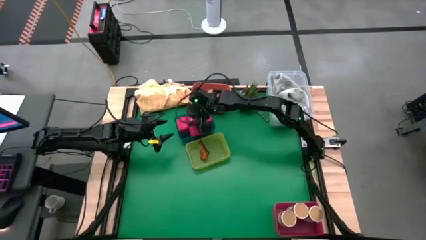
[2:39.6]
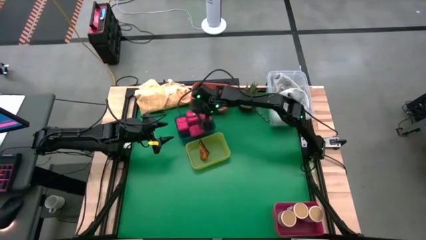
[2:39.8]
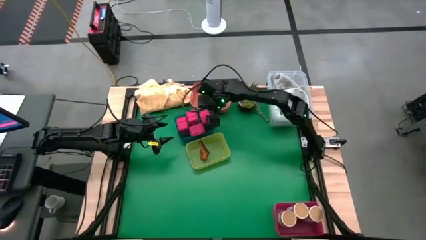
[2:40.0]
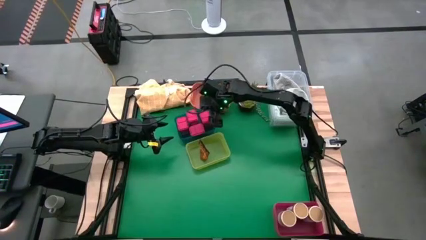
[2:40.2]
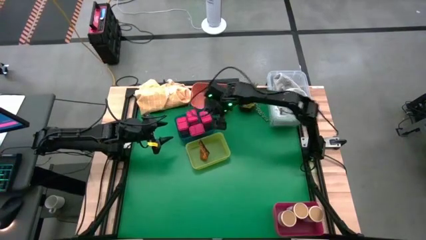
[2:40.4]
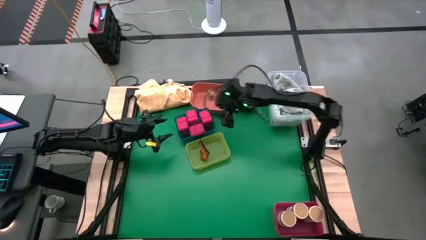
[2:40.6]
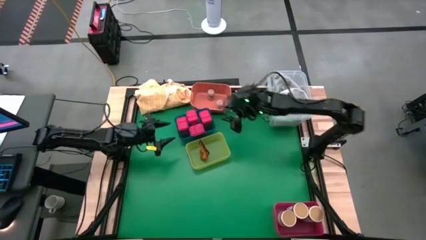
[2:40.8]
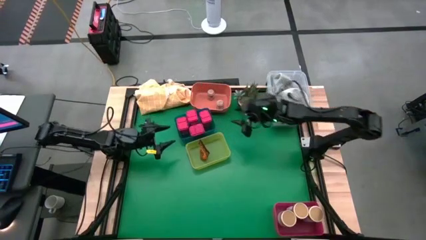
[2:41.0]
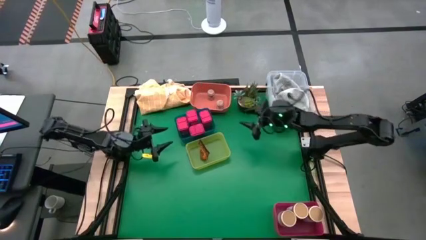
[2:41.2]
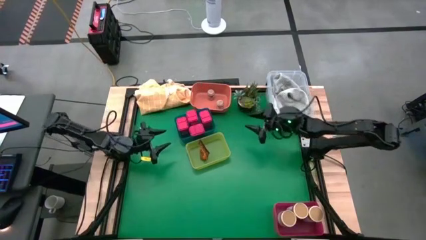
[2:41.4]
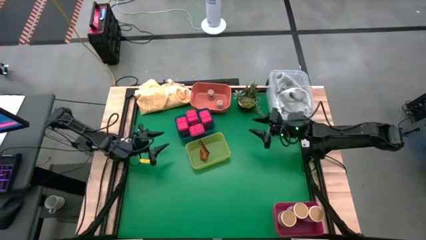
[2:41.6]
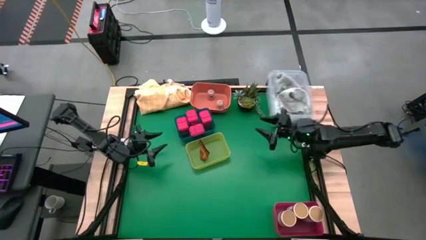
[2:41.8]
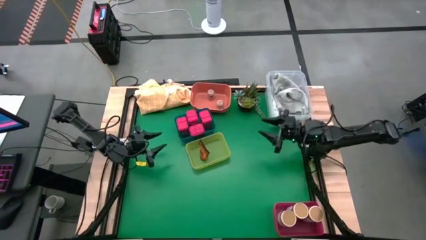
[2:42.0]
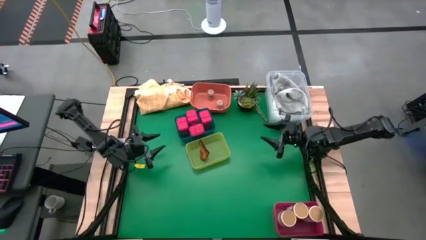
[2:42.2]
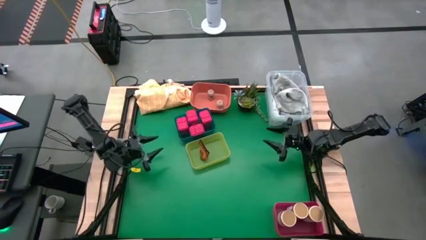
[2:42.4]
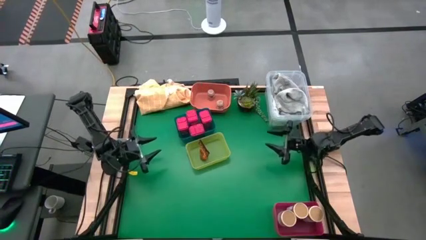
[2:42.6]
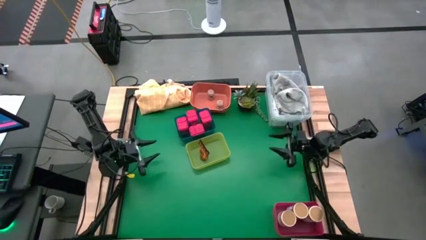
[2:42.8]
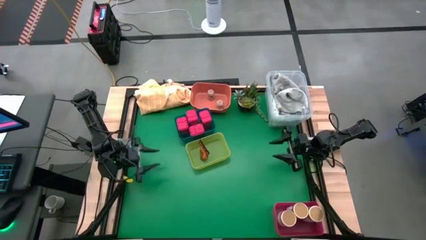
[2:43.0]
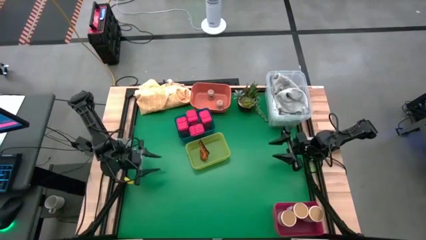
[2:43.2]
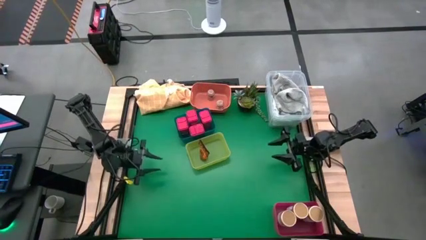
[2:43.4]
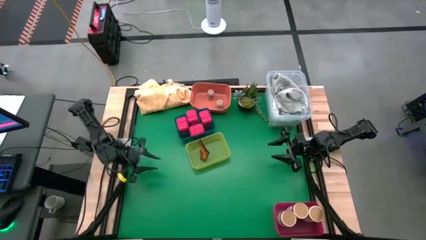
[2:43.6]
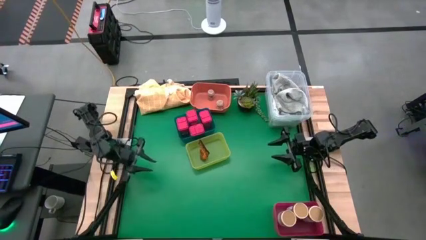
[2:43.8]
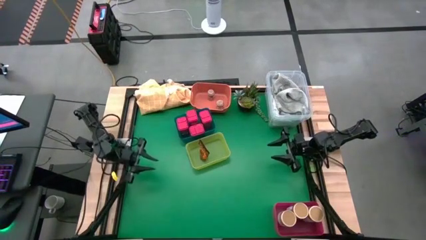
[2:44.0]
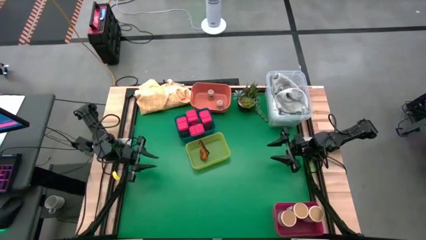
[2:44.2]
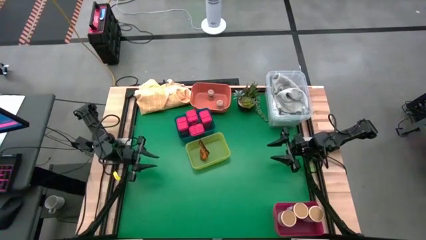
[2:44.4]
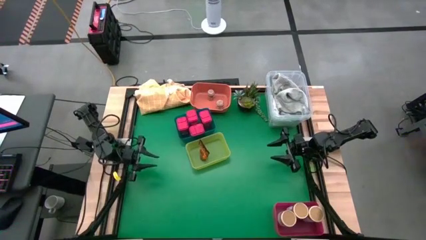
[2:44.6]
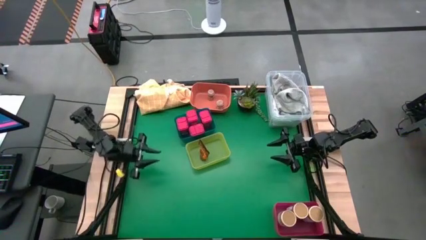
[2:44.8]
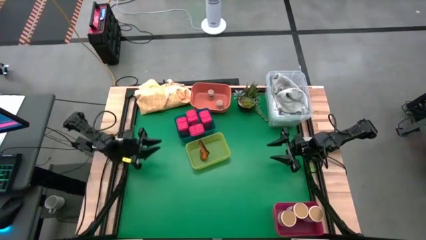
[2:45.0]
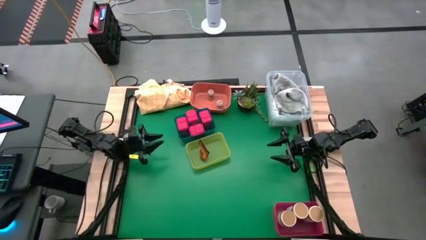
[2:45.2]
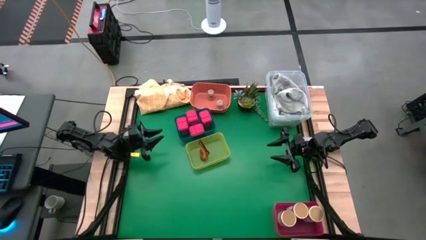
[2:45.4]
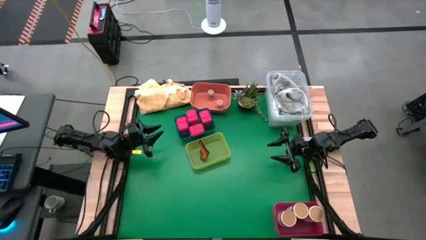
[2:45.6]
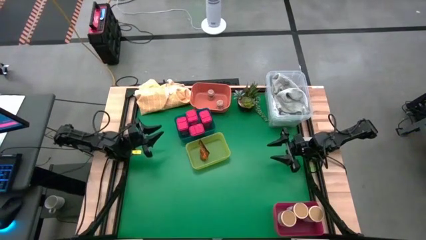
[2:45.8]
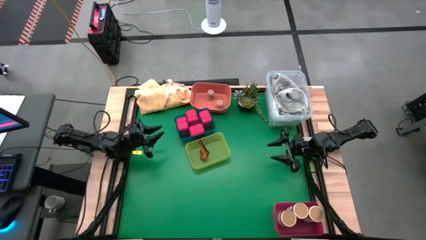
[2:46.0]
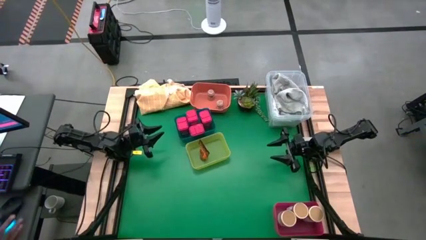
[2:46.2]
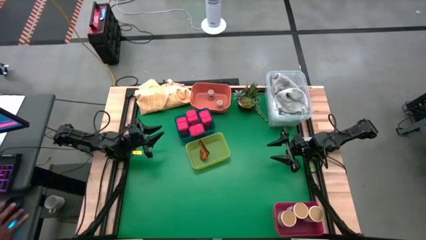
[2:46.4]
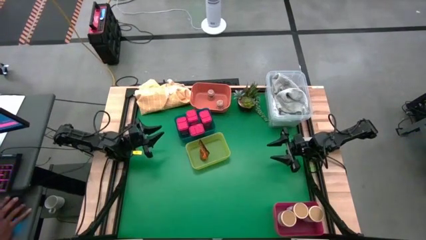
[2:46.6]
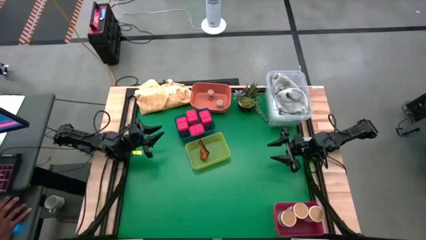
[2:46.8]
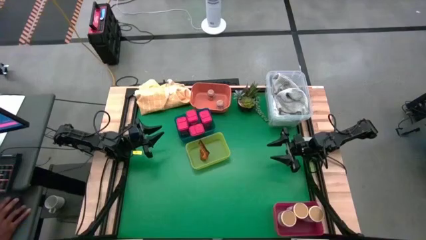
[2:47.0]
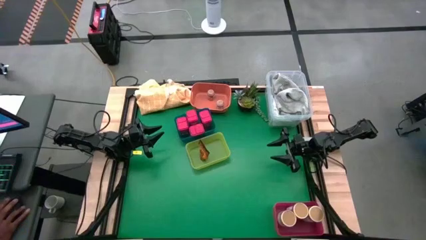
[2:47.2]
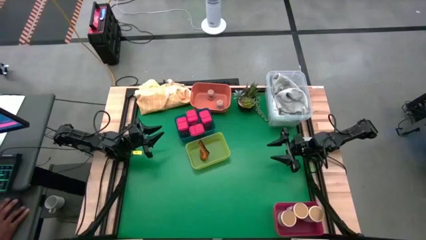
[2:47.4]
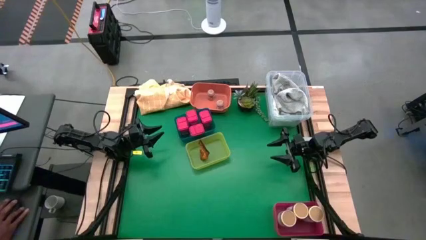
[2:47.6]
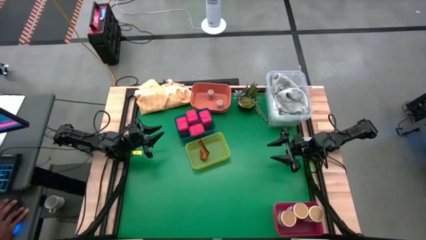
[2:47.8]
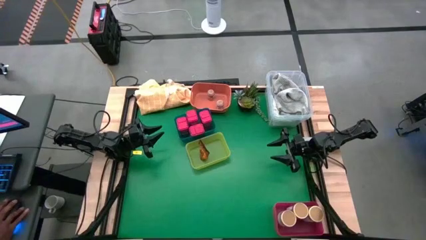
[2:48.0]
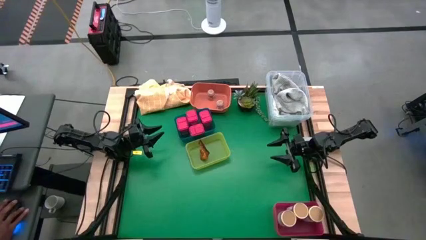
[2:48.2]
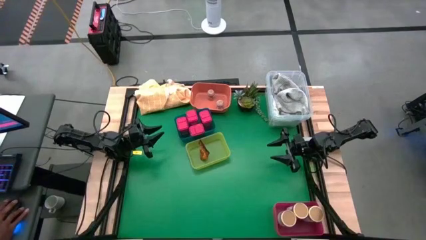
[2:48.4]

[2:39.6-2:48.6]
Task: Sort spices by type
Return to Home Position

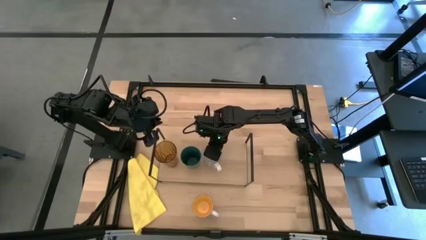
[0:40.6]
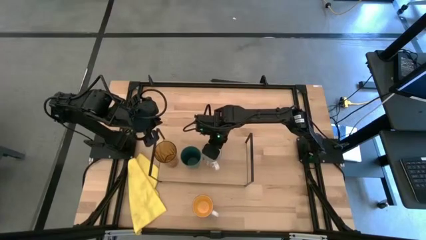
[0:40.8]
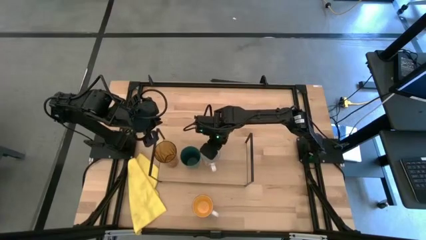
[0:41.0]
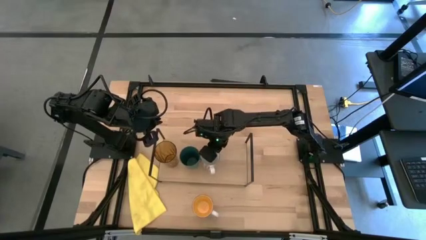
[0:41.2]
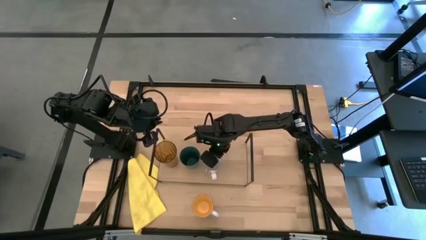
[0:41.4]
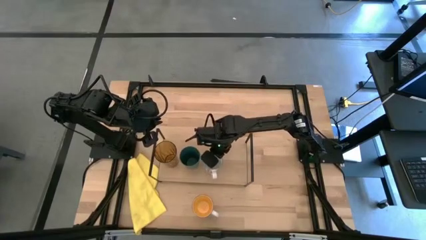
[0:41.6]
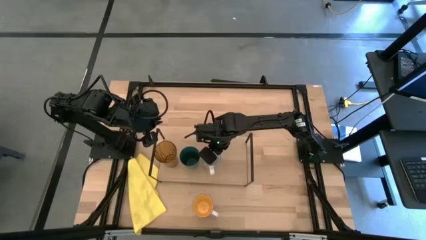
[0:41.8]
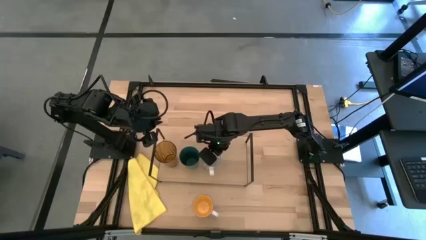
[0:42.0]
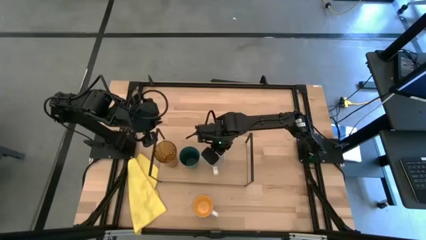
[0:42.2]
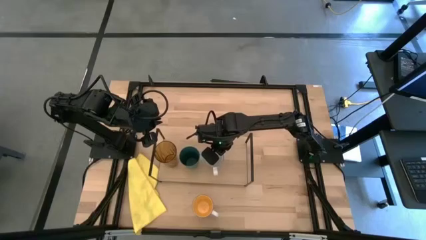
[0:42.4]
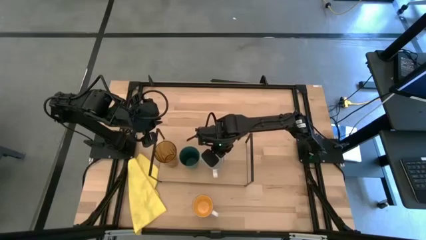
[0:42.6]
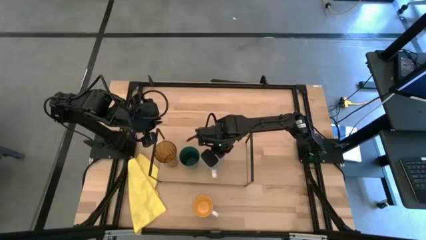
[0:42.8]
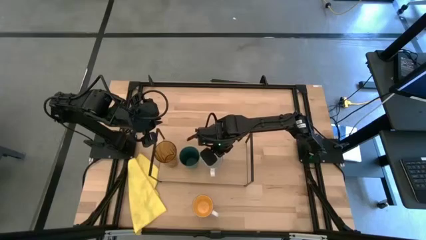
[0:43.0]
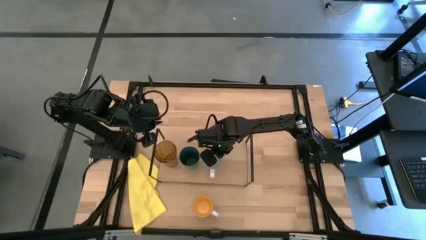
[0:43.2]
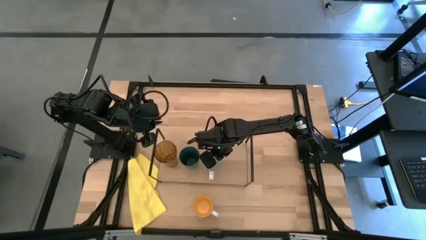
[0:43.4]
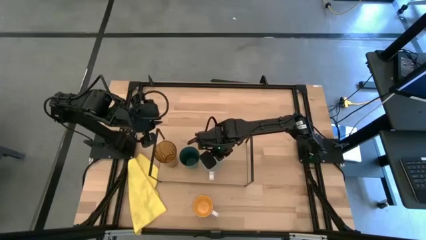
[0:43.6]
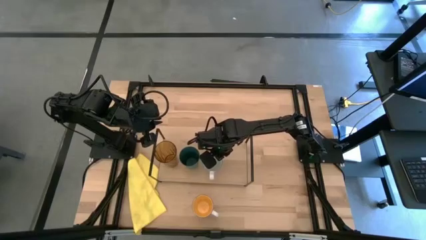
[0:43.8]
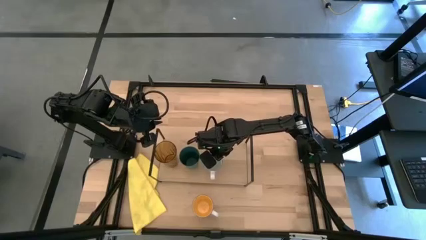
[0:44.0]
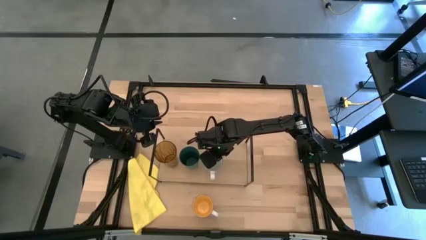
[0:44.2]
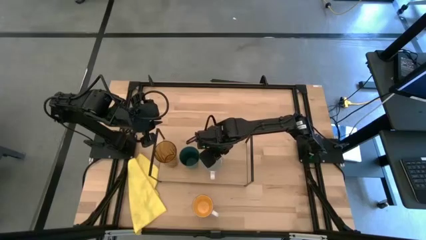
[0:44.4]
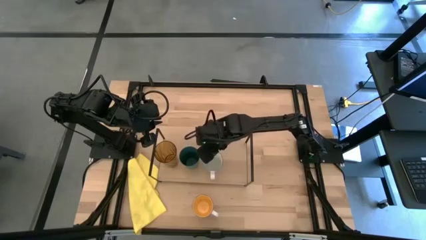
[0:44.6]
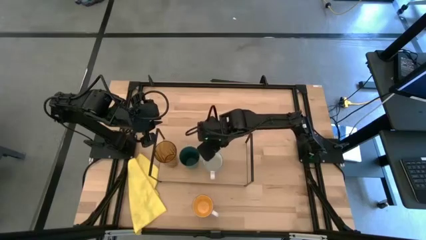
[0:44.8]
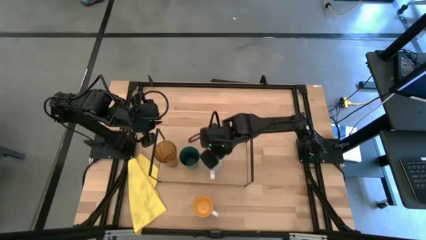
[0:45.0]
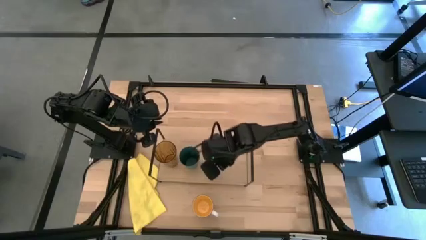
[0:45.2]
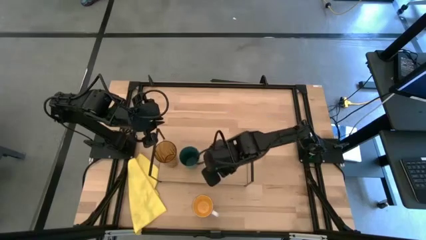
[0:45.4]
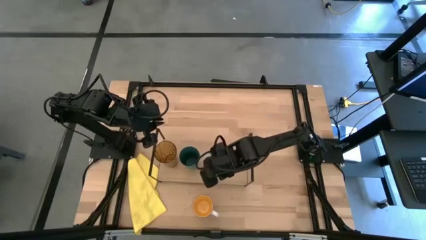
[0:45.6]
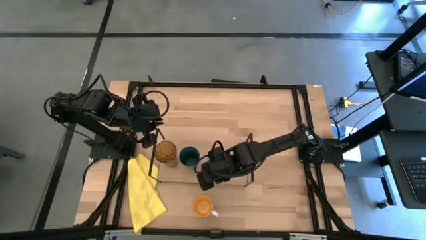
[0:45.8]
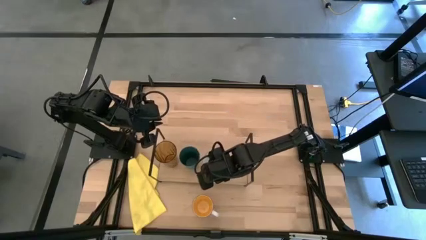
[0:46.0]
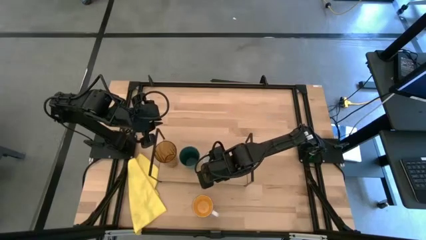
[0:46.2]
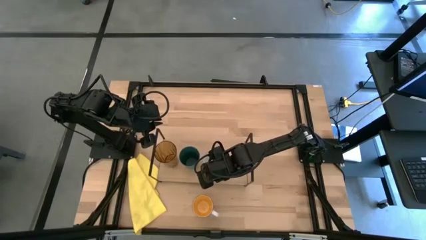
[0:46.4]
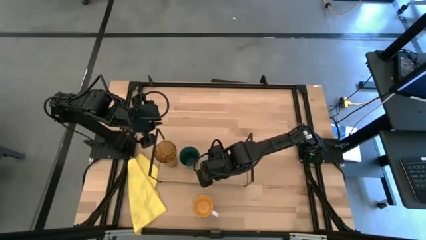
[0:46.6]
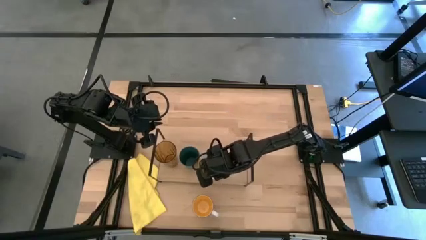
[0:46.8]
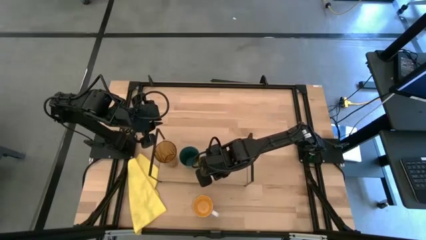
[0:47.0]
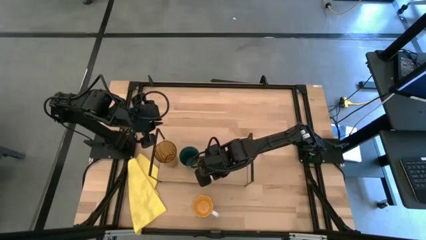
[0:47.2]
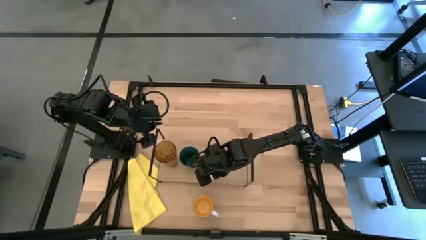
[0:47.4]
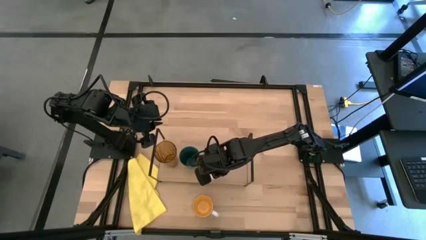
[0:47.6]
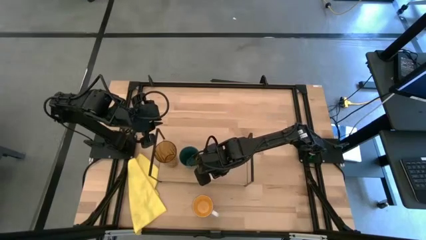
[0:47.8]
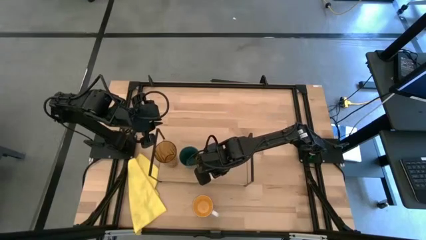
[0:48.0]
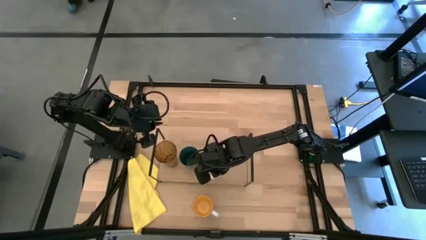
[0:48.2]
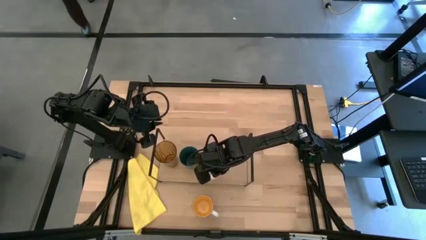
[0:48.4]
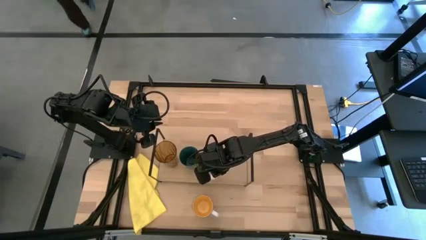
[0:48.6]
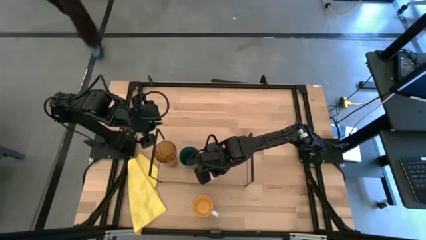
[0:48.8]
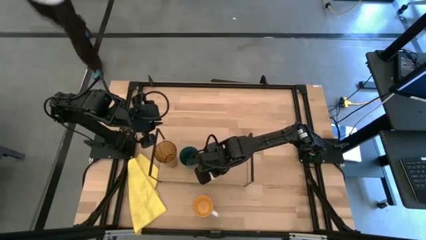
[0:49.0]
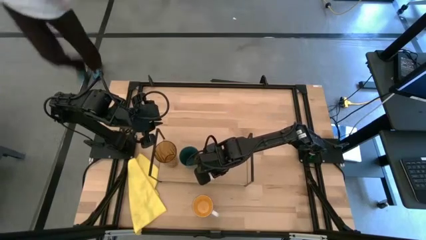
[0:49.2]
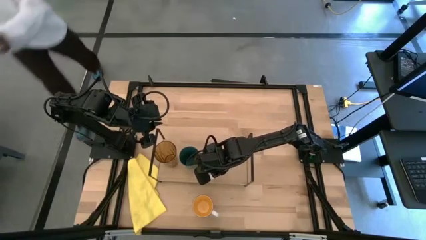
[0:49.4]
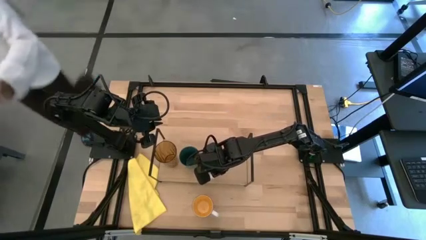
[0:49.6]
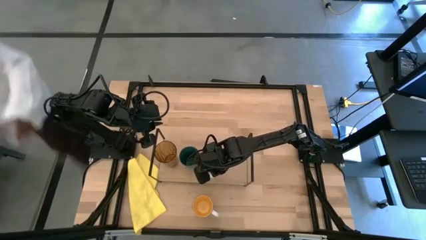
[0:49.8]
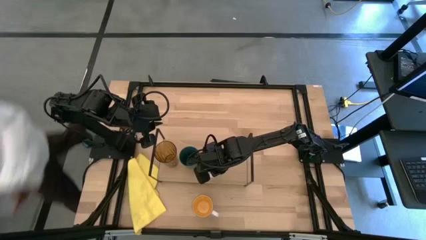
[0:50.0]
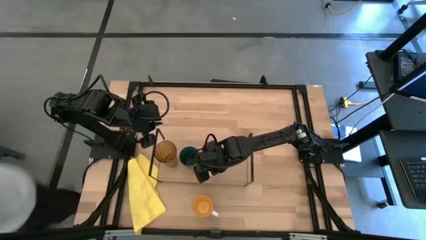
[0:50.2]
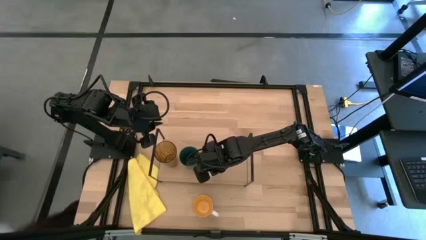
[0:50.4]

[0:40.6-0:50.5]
Task: Stack small to large cups/mugs on shelf
Put the red mug on the shelf
